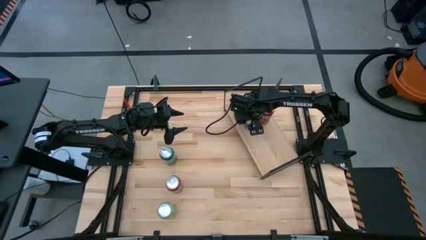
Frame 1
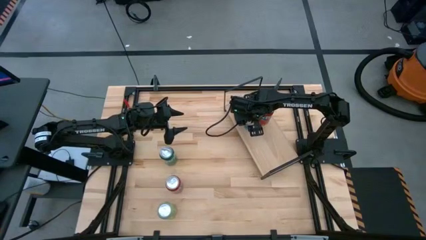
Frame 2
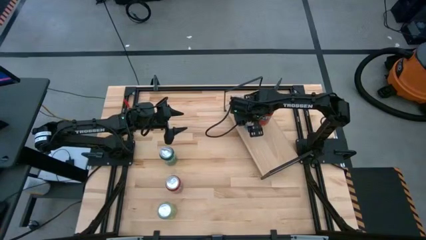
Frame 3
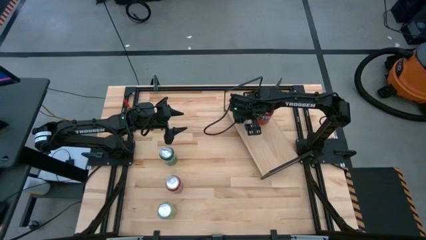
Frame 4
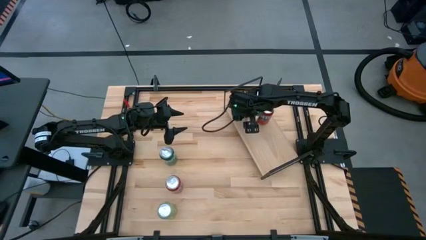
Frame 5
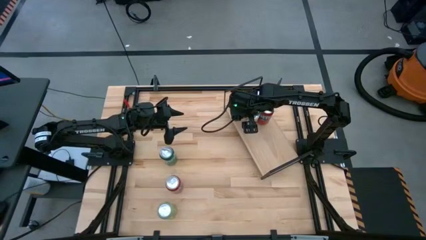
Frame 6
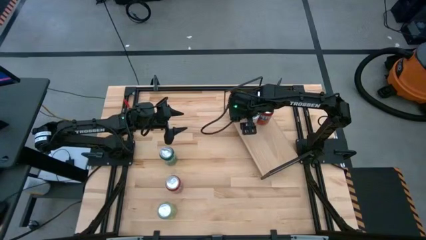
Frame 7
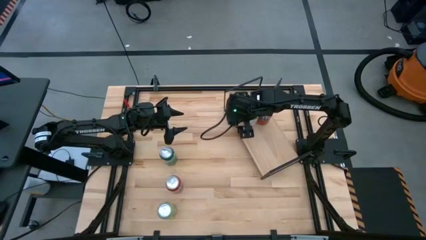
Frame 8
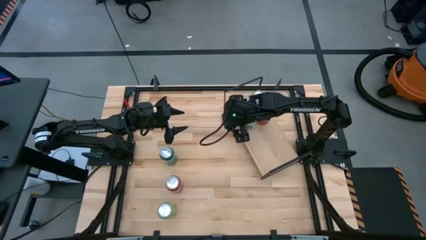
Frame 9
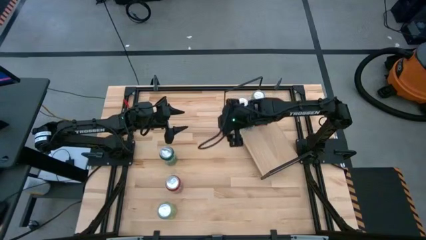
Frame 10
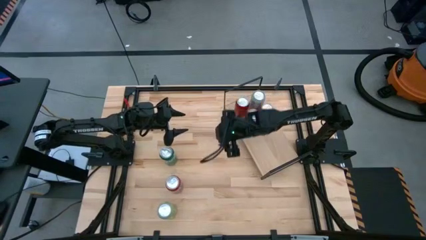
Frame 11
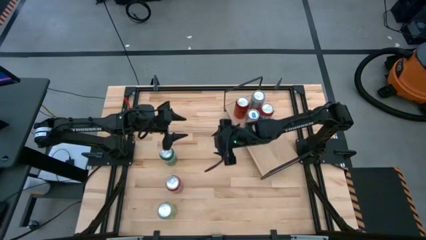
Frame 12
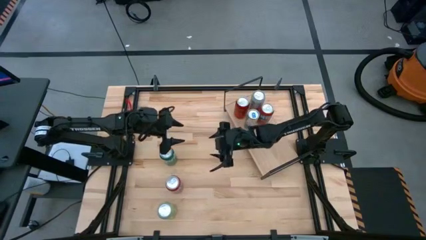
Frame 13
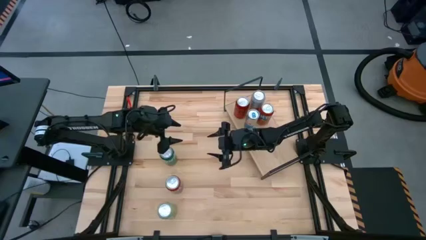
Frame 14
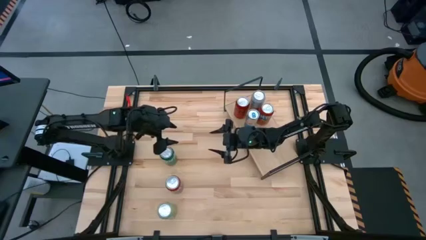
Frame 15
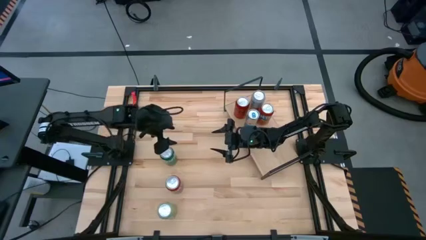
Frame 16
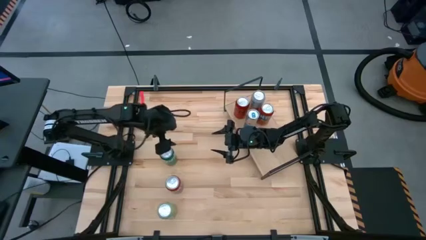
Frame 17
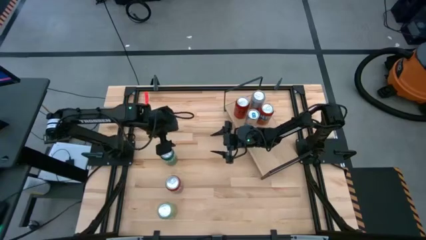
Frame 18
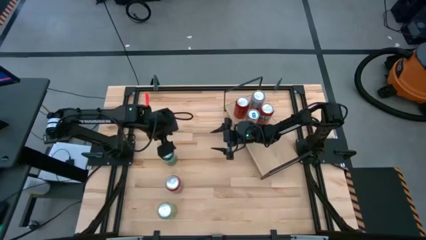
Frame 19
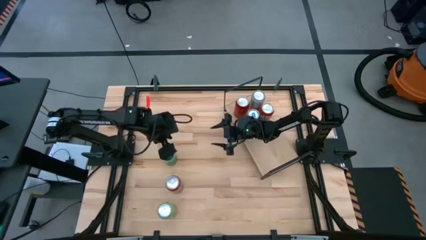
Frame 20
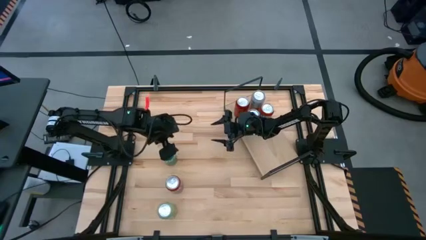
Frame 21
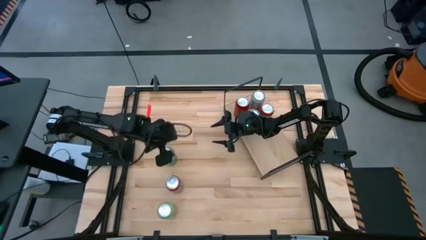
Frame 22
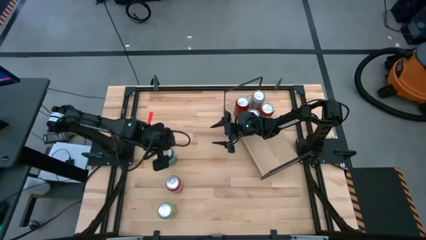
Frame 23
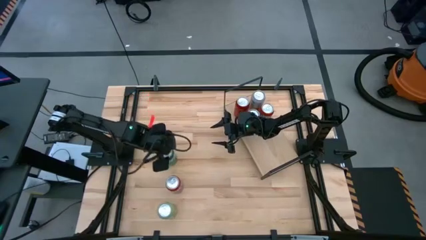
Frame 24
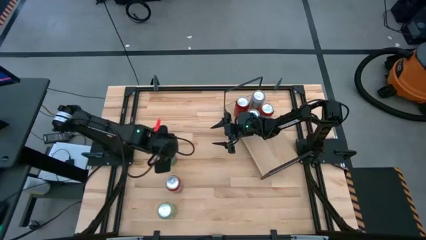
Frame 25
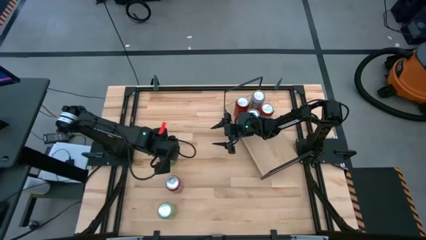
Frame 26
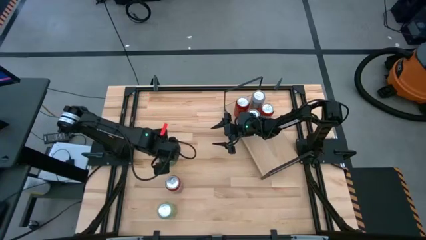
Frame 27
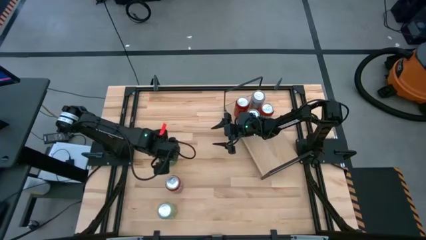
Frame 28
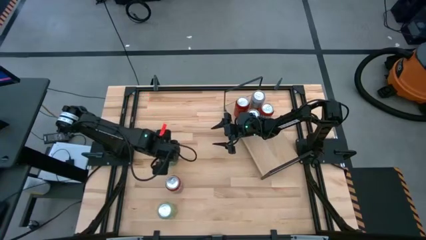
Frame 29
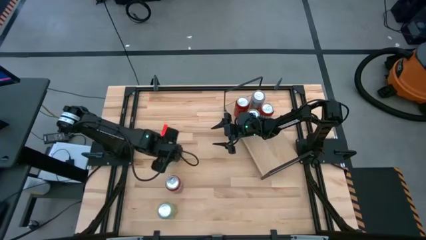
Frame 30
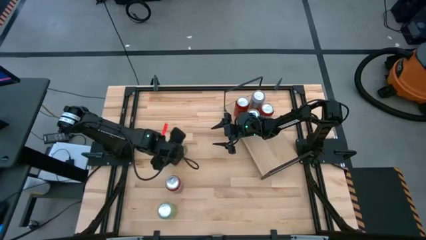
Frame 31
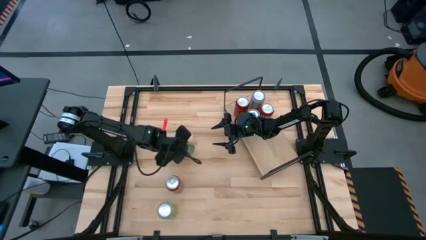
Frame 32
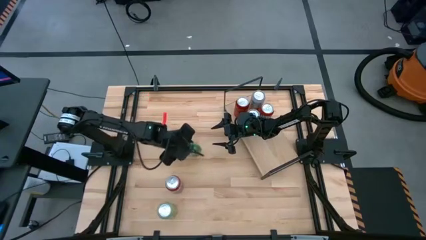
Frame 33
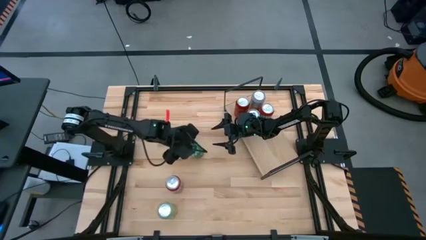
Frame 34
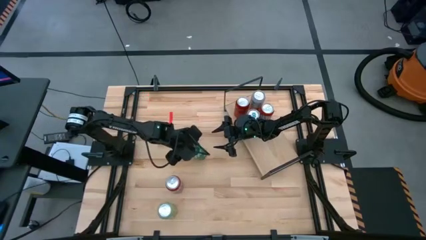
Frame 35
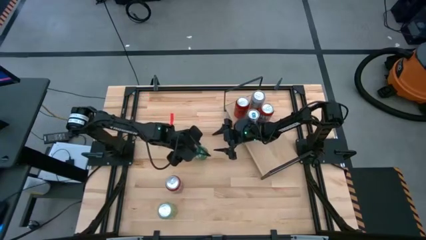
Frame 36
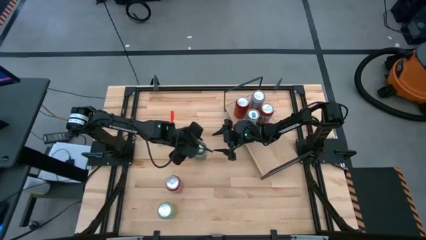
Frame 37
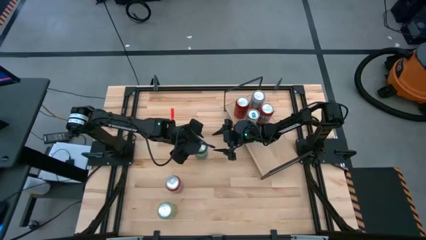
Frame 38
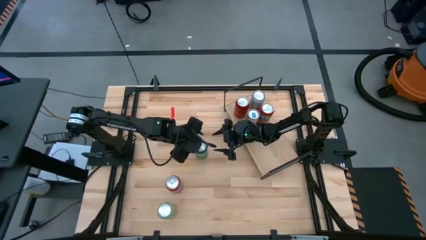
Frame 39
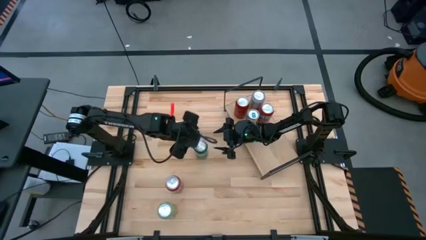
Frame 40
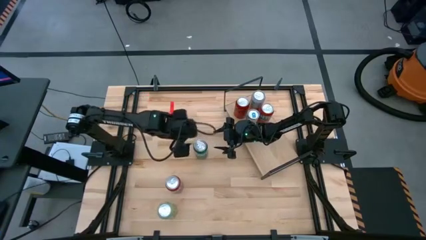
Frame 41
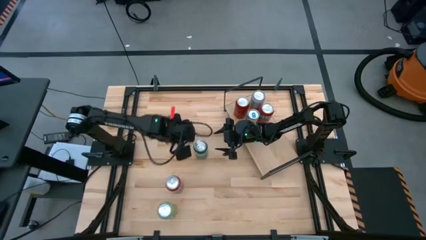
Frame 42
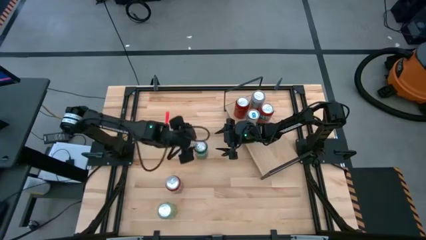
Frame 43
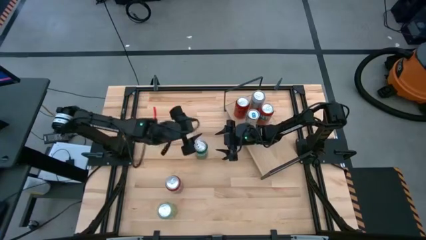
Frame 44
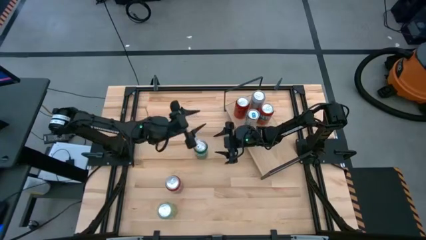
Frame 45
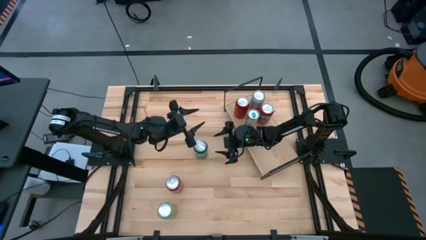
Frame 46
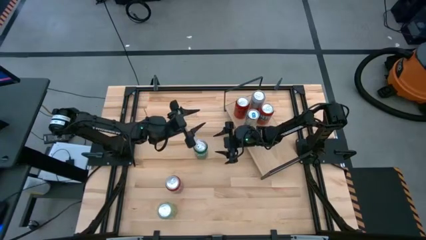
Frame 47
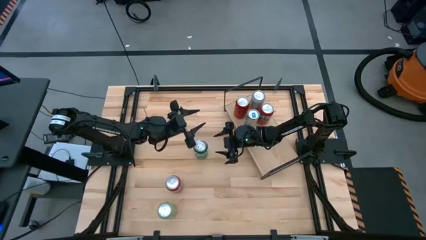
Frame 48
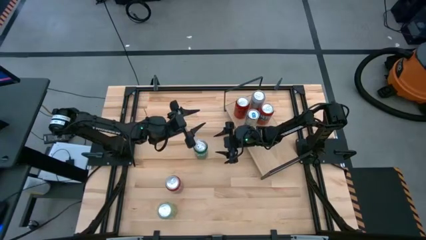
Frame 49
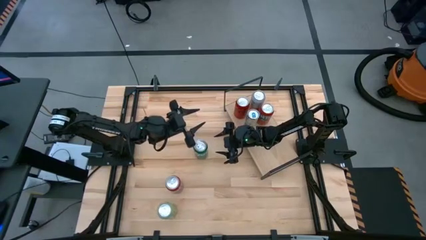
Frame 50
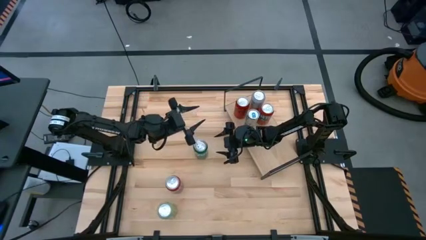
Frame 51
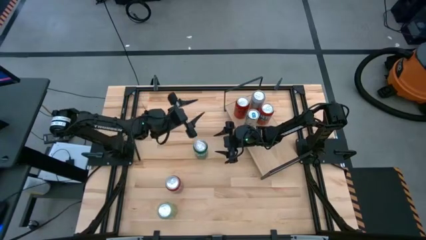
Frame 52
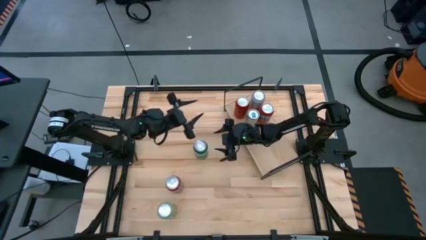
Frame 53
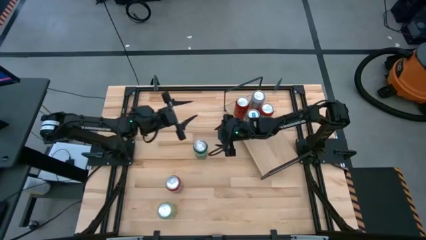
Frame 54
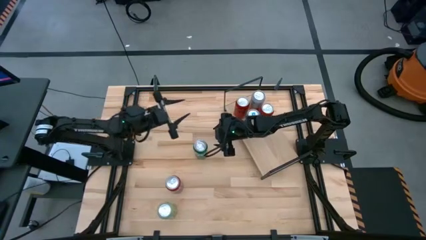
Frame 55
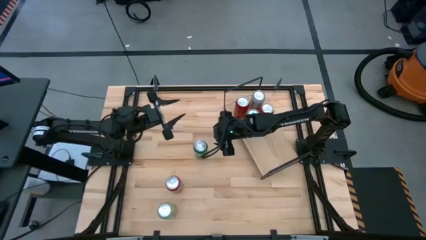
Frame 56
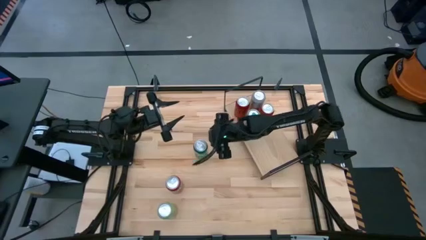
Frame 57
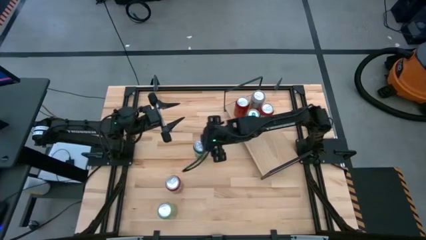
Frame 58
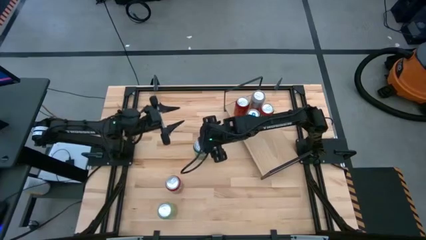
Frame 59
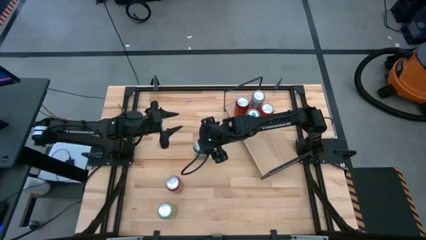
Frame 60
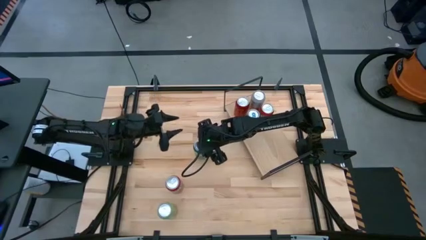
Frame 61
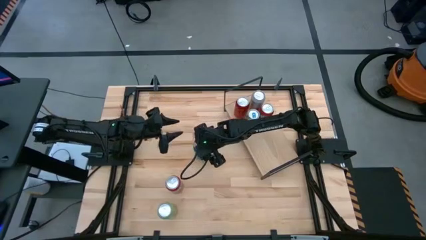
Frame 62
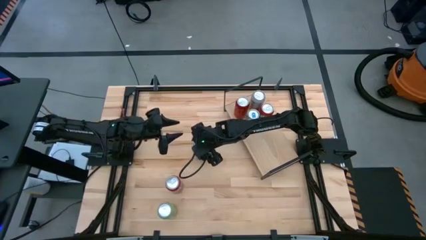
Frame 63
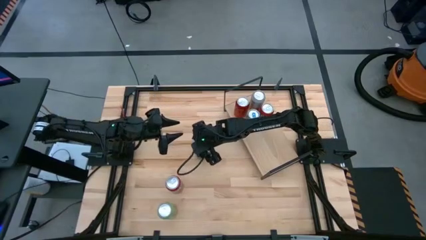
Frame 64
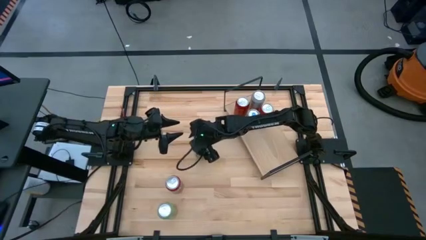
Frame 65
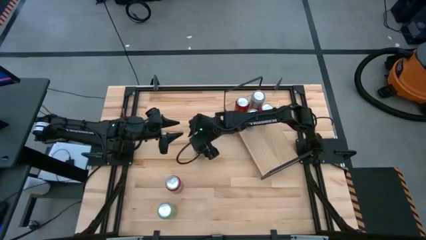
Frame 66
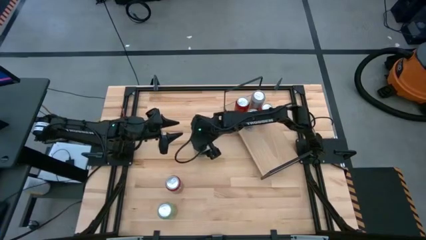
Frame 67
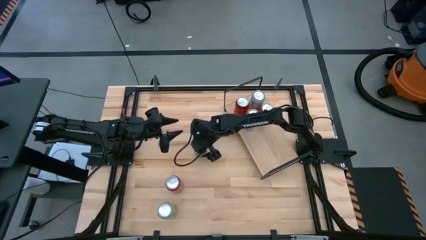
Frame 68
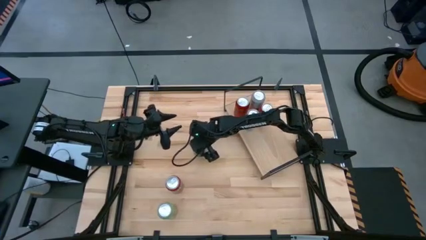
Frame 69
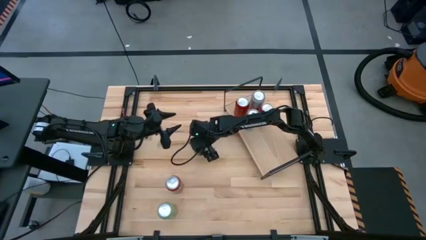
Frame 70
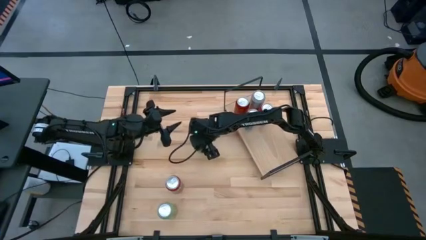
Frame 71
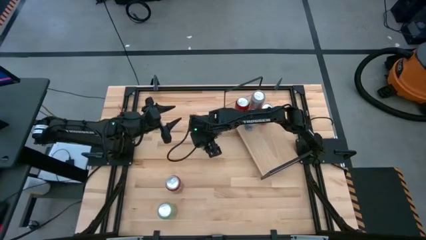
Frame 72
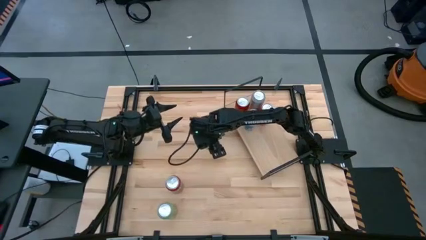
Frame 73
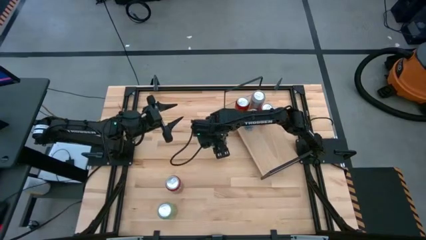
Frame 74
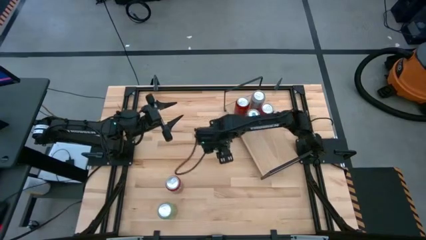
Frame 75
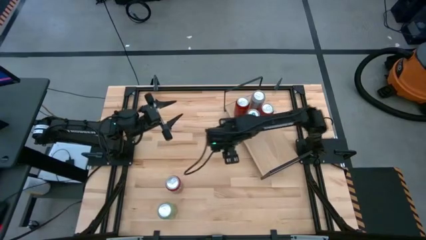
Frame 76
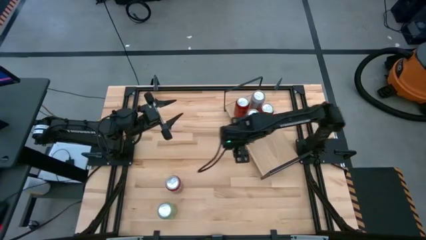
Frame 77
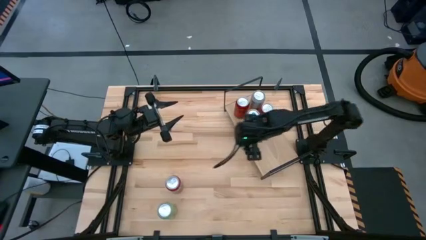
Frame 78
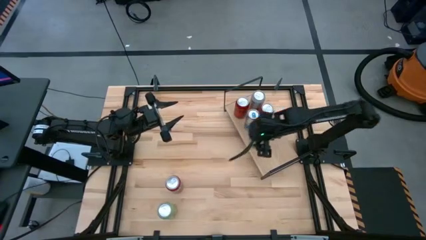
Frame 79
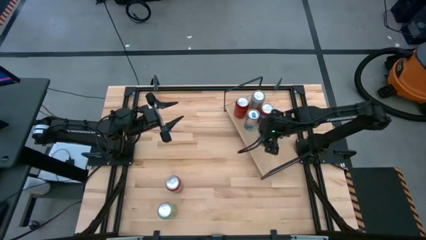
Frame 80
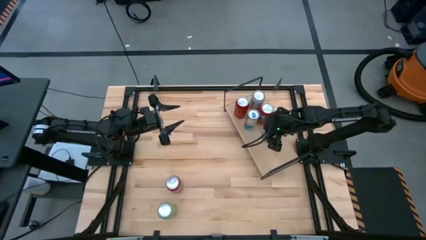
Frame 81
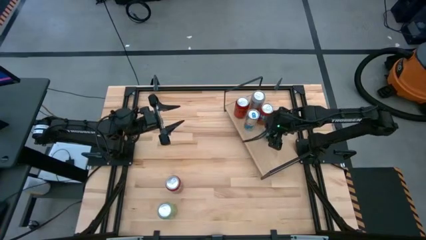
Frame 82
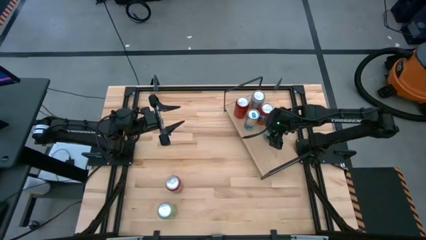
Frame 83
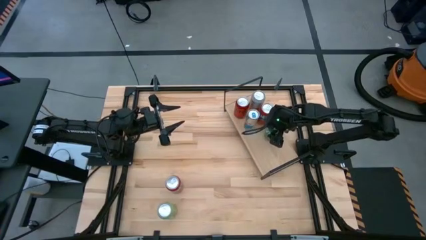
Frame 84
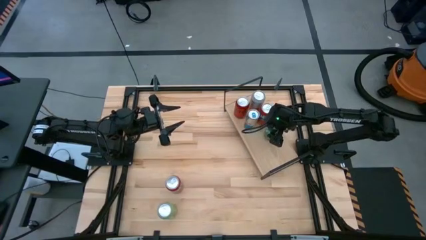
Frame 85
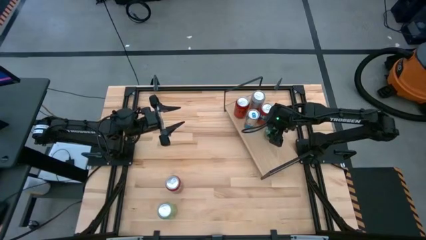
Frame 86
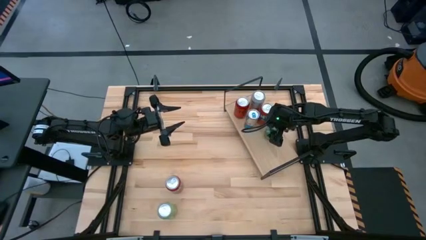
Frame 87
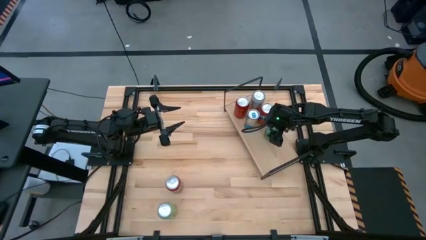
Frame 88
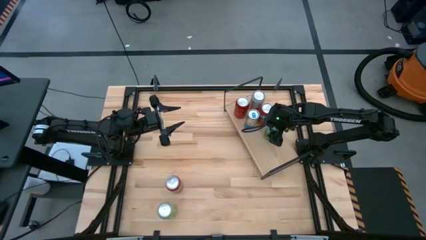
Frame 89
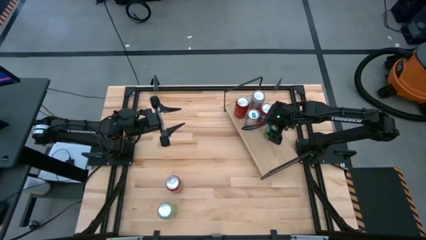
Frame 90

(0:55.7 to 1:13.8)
Task: Place canned beverage on shelf
Put the green soda can on the shelf
